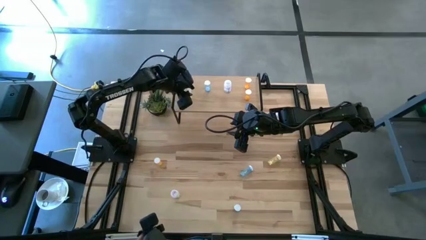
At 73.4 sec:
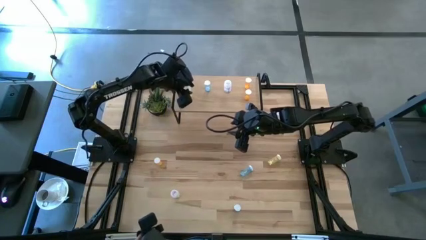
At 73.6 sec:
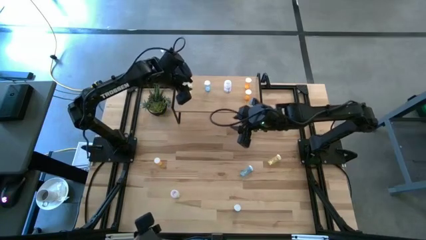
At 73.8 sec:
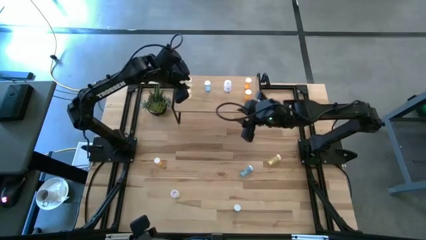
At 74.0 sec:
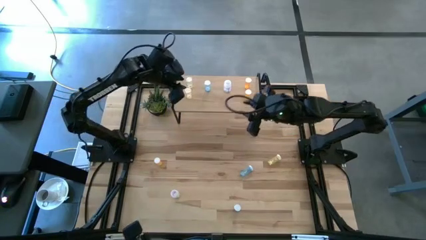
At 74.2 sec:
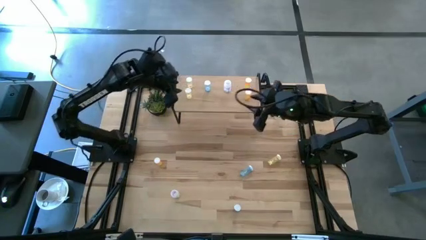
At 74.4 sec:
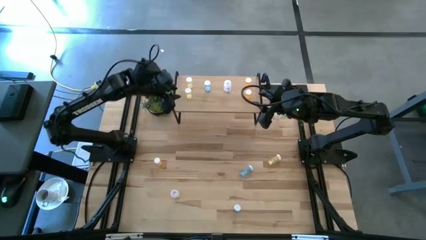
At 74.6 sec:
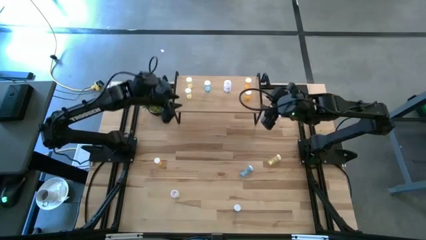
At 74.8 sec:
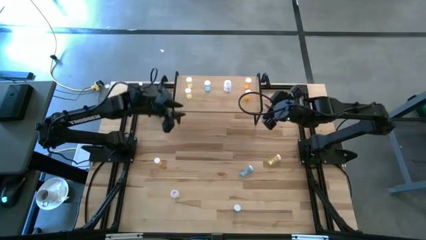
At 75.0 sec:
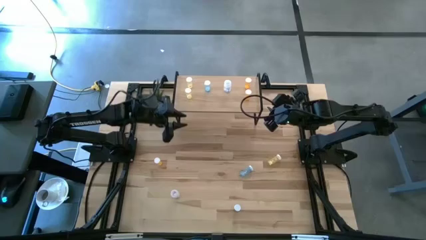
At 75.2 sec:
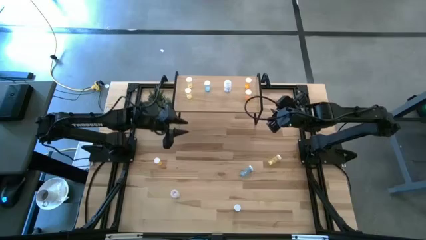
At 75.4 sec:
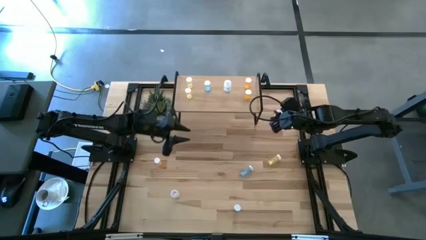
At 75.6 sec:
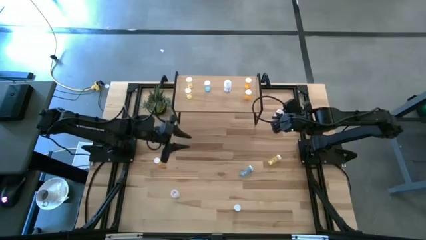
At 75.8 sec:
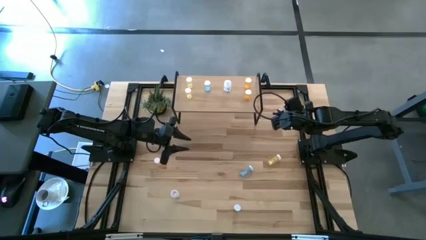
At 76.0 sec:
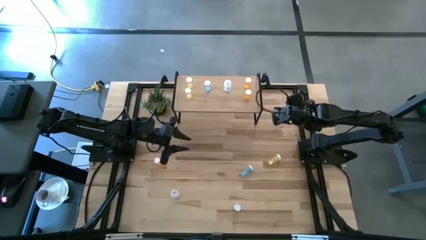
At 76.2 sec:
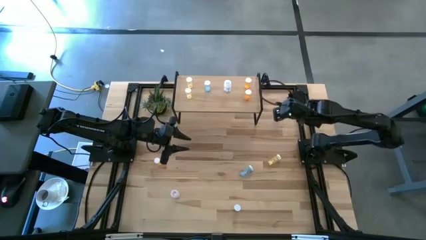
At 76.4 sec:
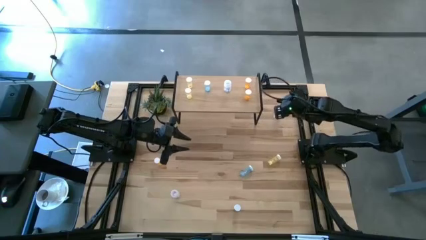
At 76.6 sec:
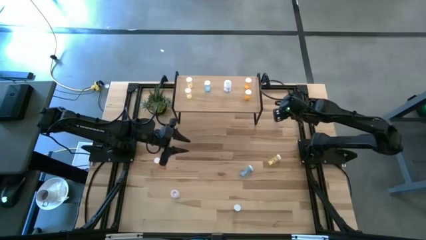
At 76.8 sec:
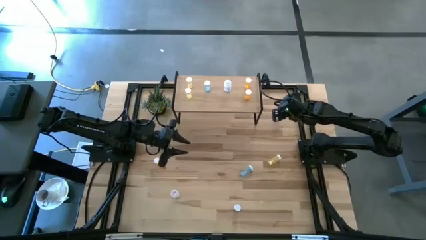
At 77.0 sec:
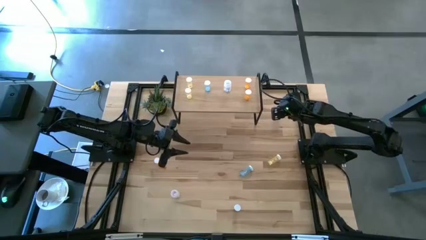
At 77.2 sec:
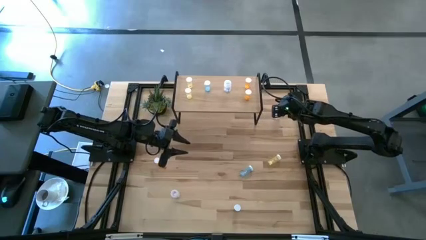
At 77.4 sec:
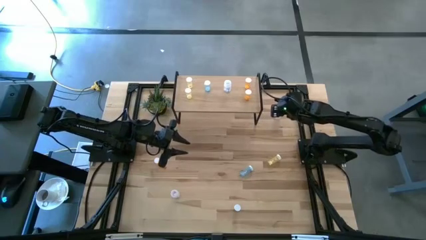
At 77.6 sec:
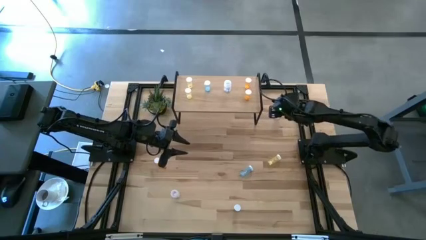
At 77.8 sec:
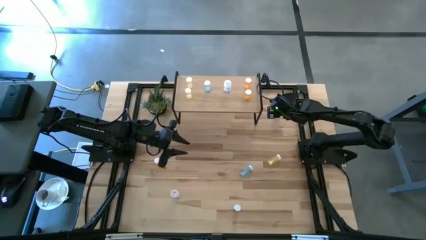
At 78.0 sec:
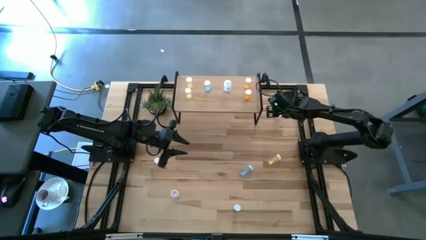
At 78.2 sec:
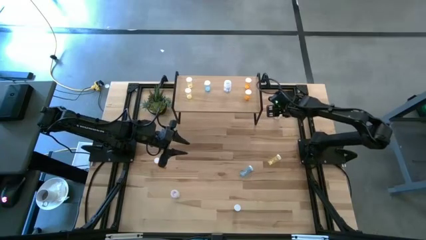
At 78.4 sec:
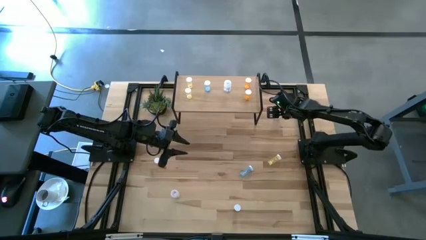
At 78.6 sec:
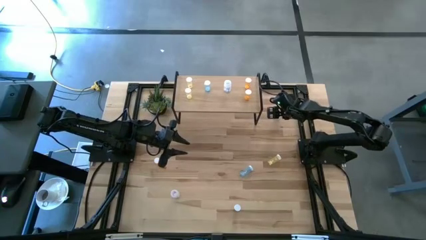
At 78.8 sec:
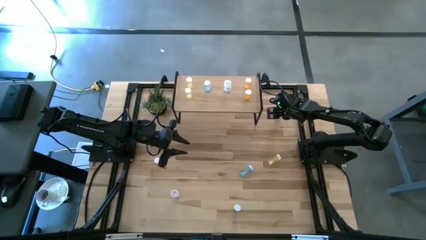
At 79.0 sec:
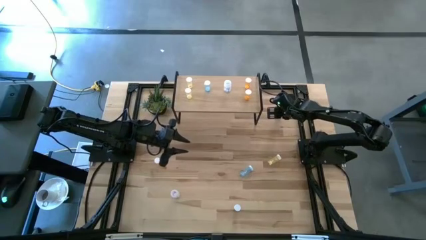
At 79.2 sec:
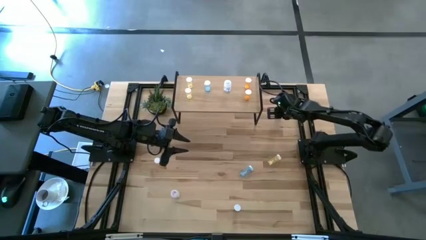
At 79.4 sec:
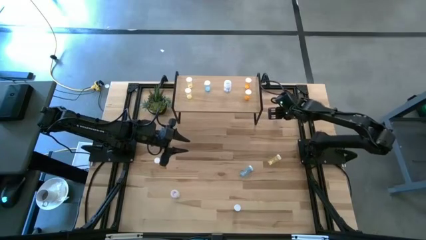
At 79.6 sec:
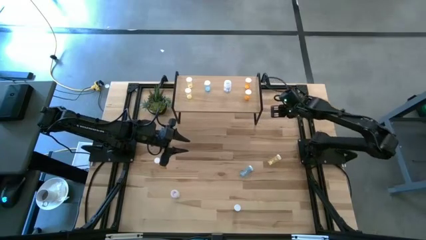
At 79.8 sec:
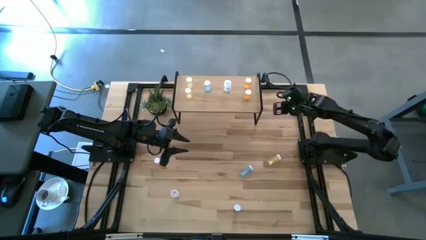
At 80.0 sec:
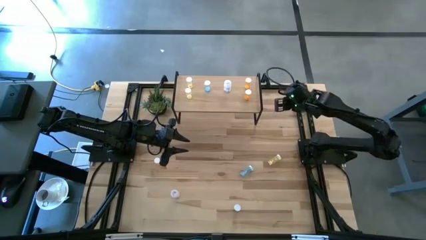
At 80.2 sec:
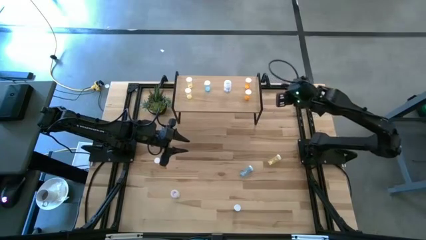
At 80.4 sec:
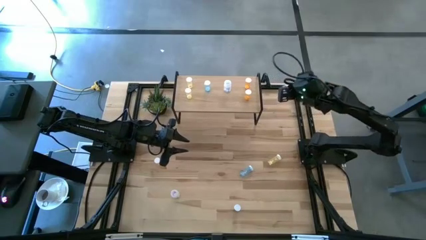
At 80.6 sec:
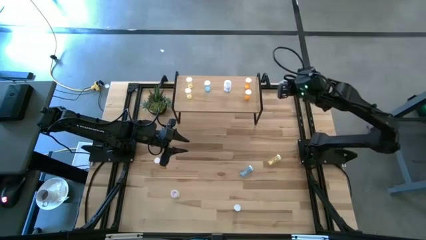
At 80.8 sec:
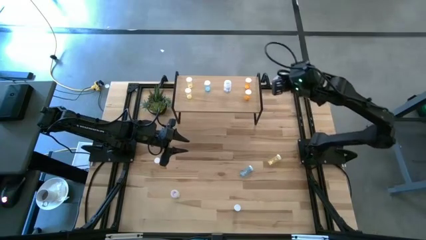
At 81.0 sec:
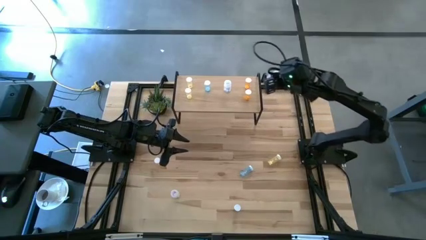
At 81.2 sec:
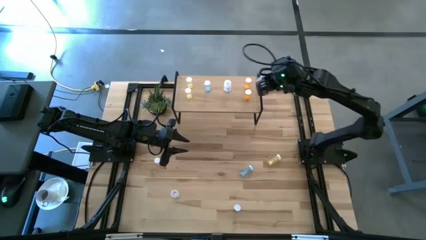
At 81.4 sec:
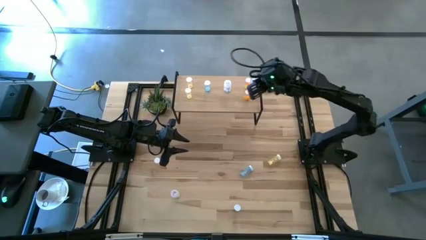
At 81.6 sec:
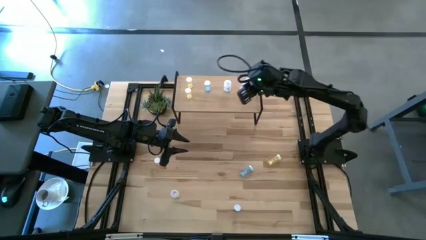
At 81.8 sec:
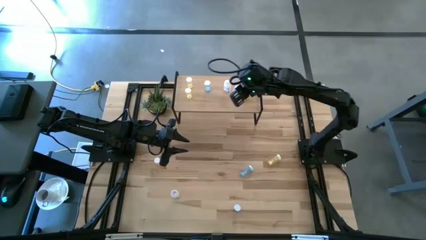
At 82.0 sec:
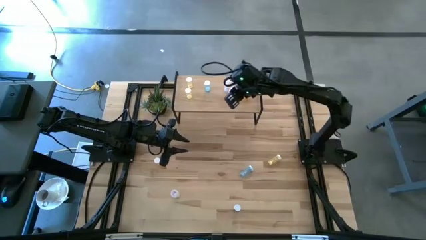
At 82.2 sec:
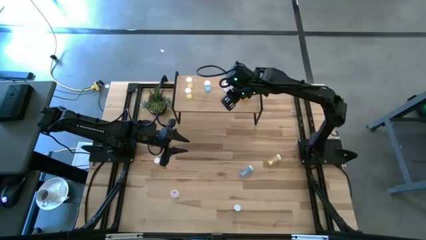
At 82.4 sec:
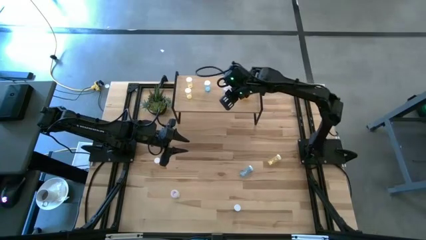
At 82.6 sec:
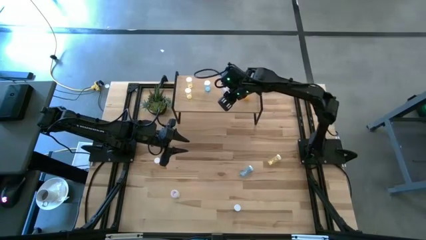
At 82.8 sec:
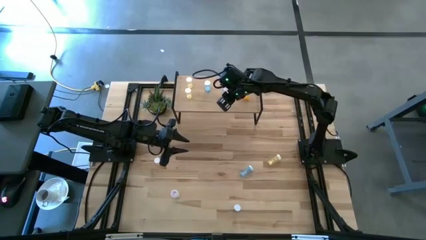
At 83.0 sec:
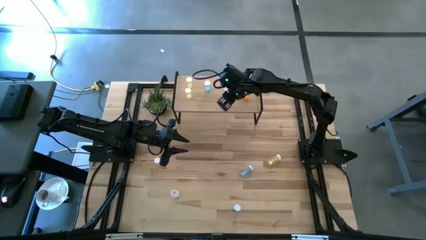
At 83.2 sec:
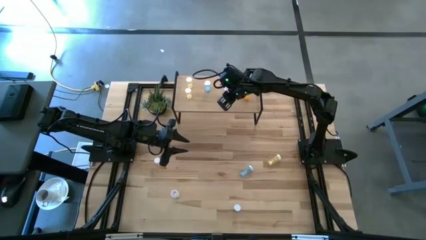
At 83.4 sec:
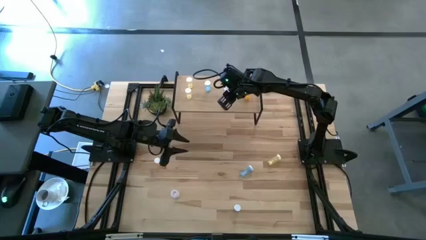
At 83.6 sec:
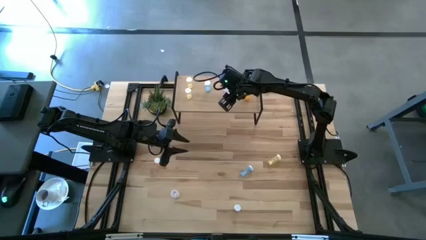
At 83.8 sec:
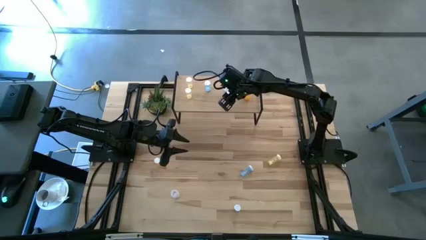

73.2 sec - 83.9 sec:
Task: Pick and place medicine bottles onto shelf by color
Put the right transparent pill bottle on the shelf

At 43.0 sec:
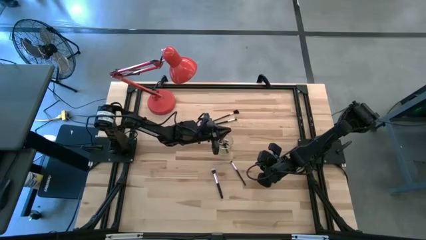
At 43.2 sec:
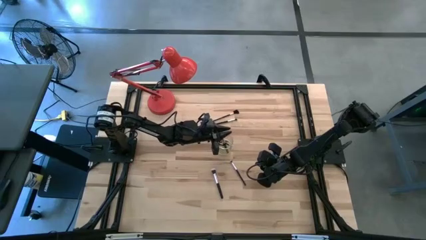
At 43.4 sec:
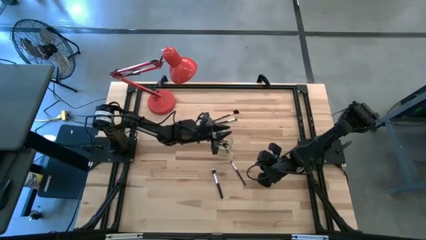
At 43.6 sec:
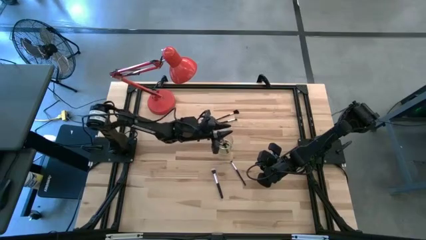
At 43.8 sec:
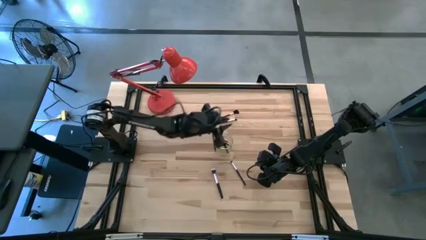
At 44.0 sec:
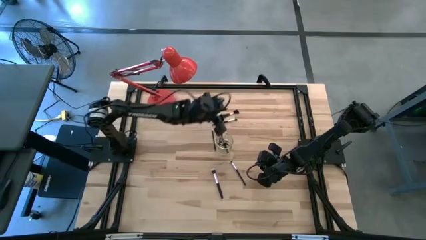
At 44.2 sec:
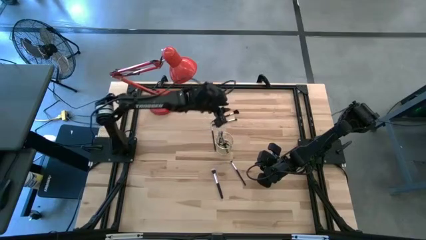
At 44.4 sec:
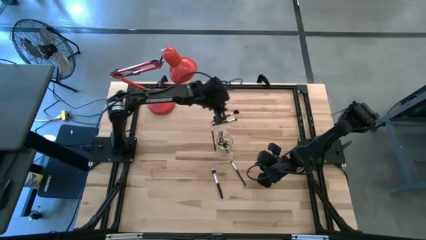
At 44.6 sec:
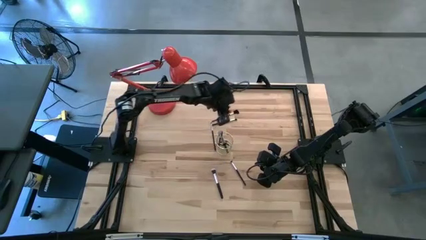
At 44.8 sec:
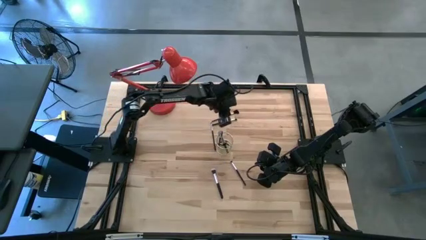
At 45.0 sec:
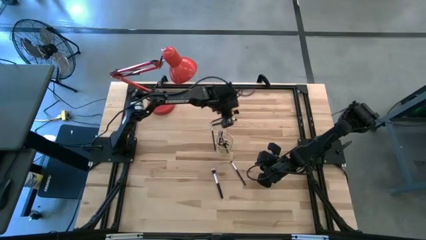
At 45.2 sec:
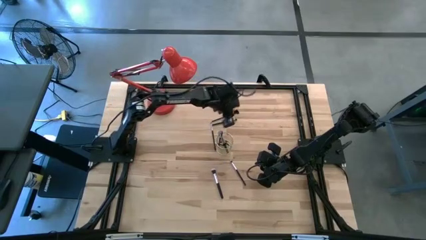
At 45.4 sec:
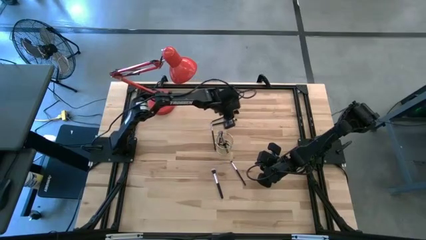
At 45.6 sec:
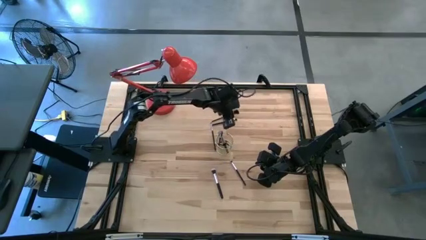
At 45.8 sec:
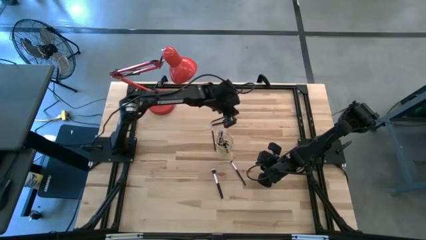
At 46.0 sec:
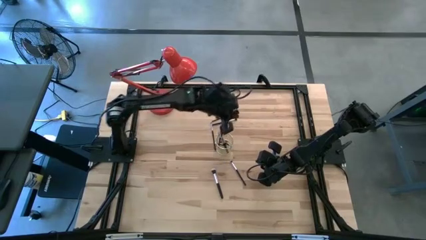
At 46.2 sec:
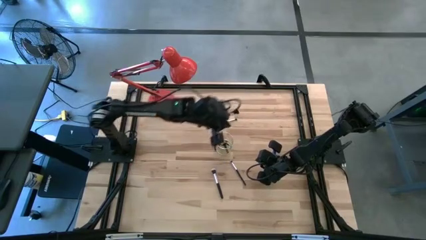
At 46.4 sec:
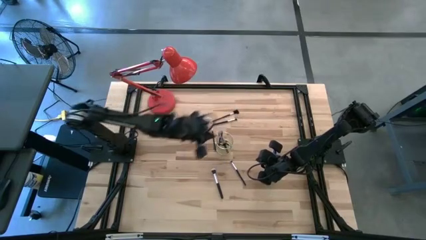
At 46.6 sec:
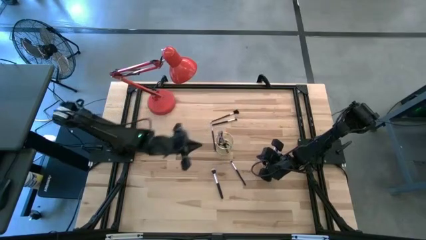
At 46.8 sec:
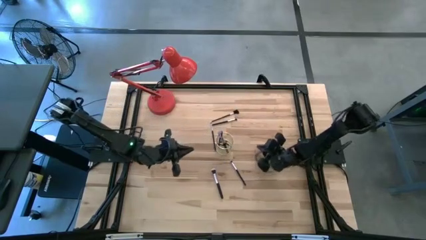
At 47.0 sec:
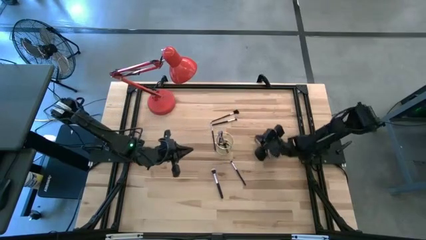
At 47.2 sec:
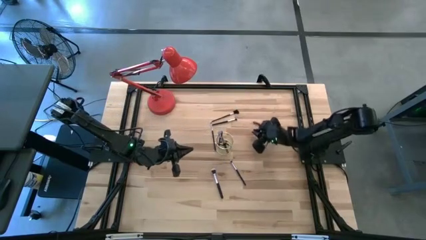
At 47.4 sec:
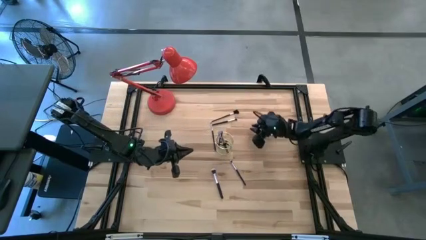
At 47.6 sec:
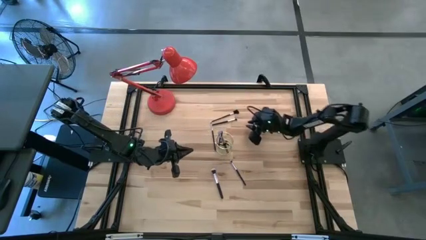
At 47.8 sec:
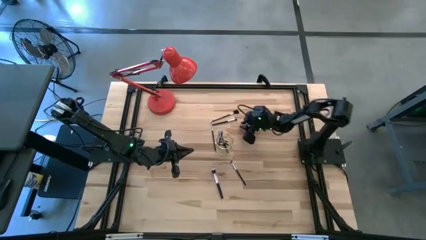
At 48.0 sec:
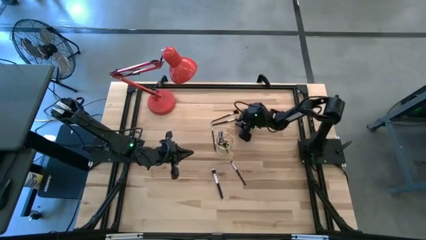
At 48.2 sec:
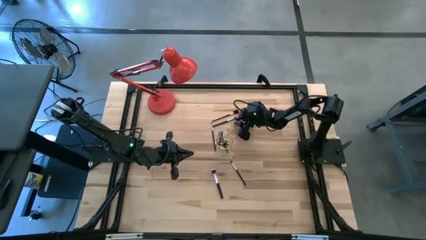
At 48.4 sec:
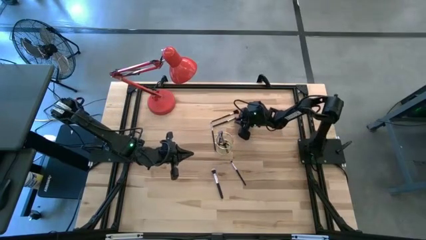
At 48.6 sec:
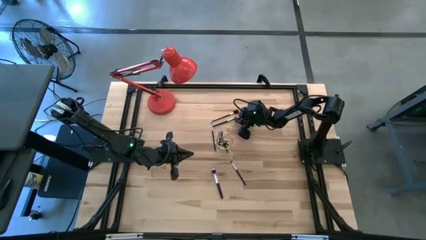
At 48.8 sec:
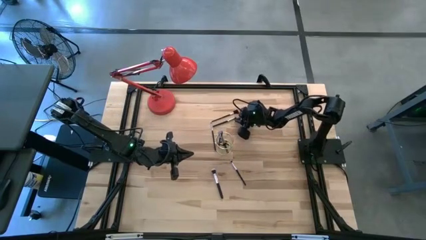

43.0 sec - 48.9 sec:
Task: Put items in baskets/containers
Put the eyeshadow brush into the wire organizer
